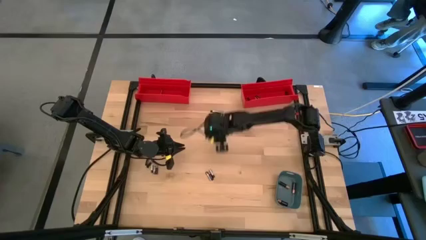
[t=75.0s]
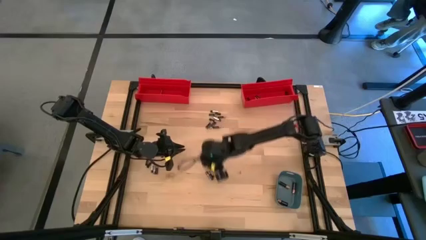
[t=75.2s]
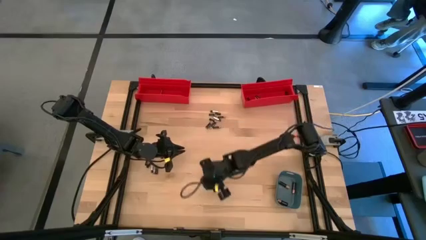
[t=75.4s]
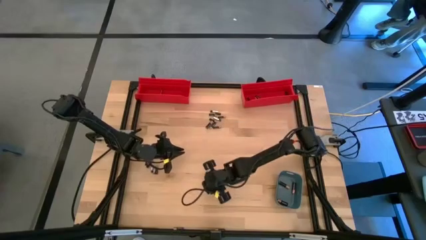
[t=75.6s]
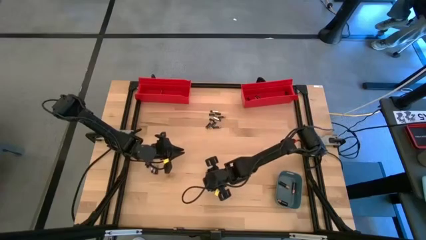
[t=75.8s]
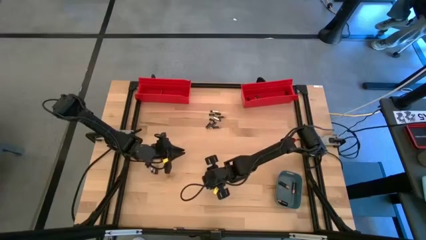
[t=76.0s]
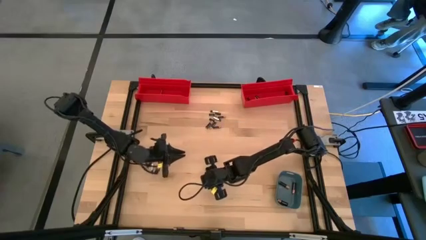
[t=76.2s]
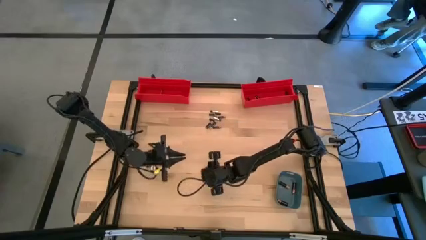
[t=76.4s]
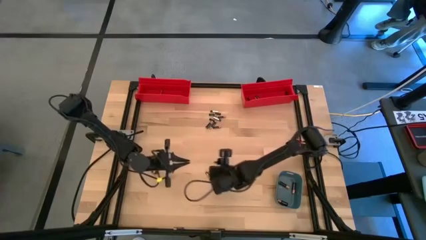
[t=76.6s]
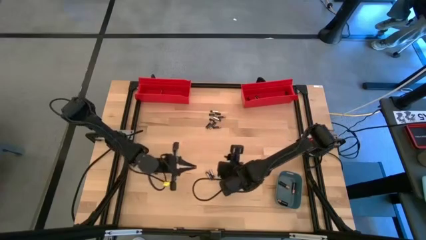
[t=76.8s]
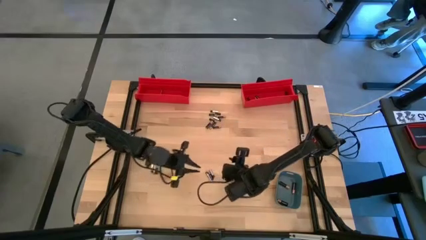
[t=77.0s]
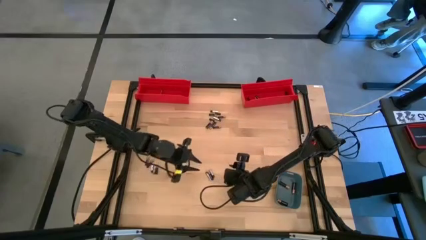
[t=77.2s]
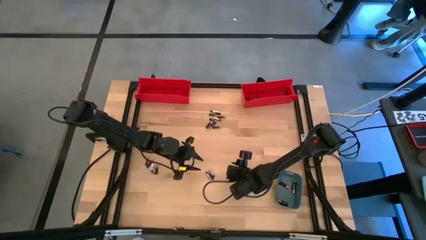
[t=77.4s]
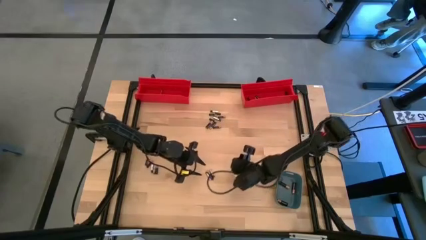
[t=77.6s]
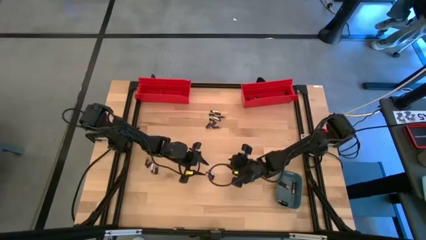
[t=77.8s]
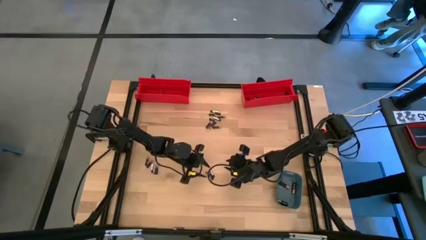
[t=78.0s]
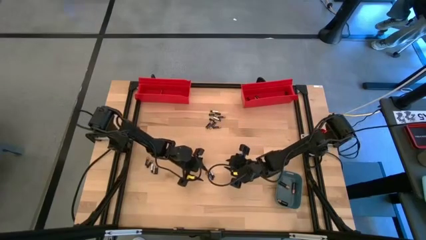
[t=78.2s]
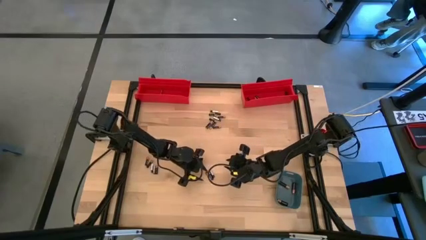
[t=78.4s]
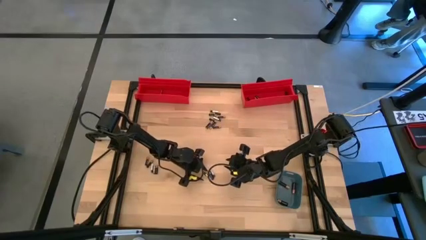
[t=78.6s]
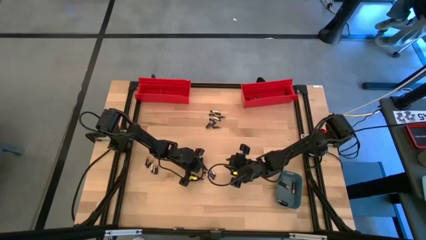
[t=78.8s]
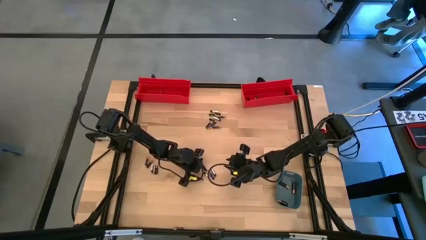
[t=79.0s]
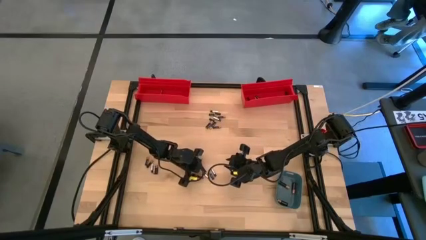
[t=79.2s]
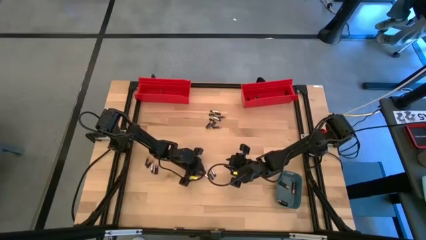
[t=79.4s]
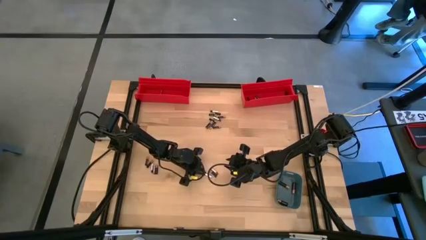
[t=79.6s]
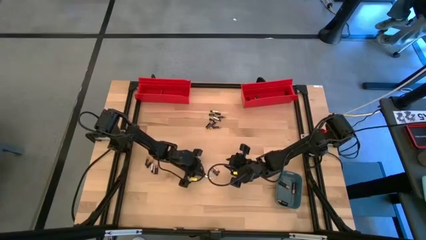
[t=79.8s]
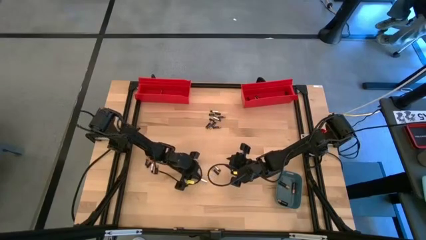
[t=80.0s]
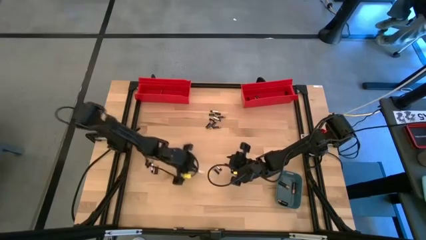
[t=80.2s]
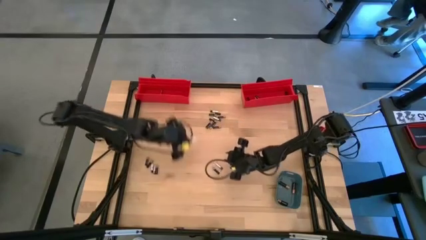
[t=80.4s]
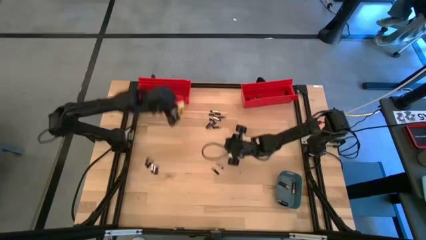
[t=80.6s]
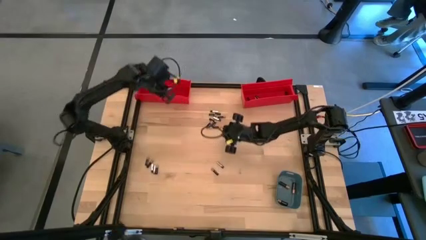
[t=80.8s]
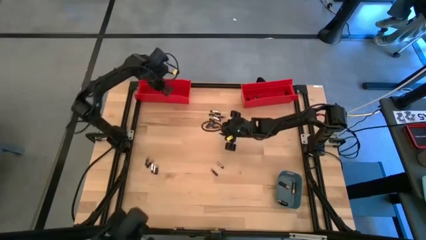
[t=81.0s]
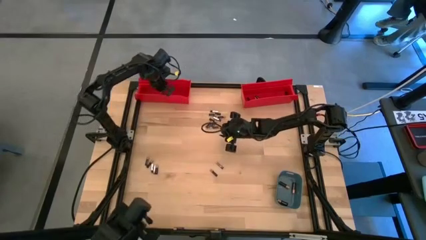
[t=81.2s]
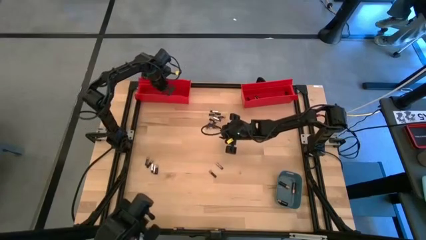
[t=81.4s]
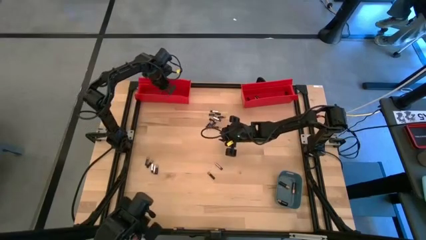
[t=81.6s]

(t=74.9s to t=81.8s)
Task: Sort batteries
Put the small silver battery into the left red bin

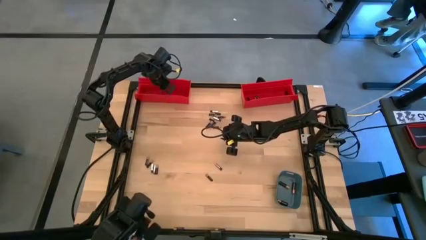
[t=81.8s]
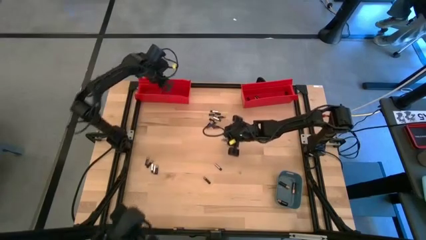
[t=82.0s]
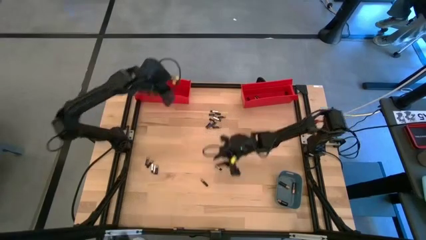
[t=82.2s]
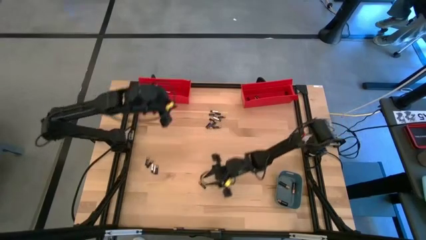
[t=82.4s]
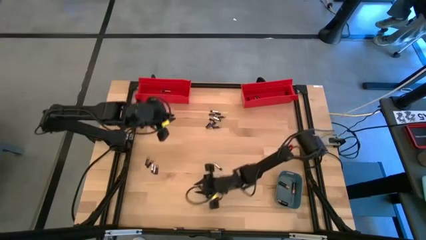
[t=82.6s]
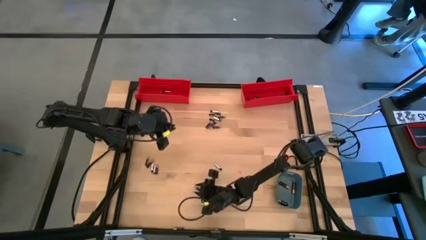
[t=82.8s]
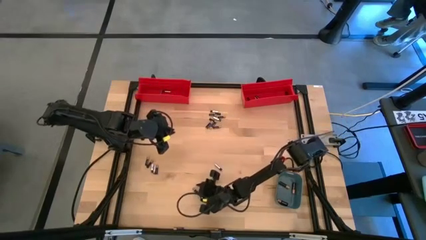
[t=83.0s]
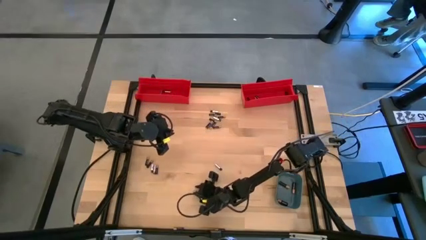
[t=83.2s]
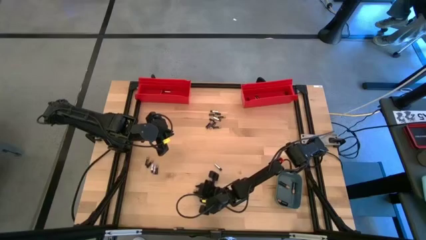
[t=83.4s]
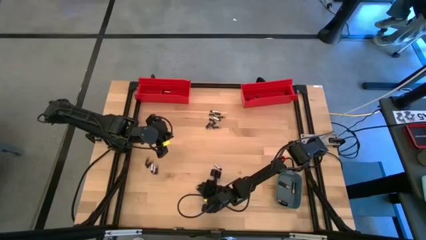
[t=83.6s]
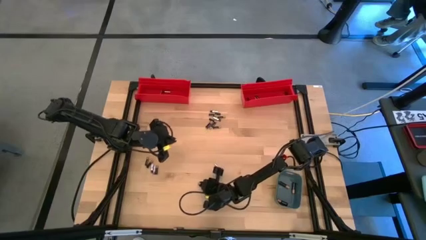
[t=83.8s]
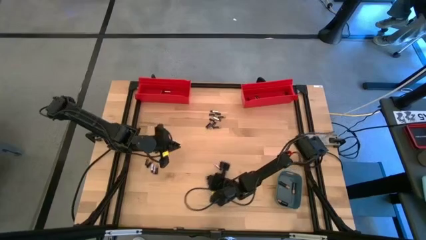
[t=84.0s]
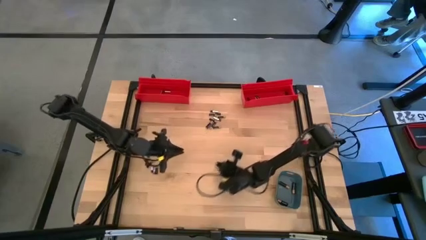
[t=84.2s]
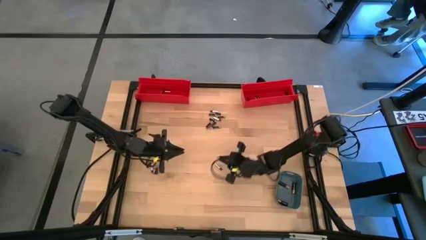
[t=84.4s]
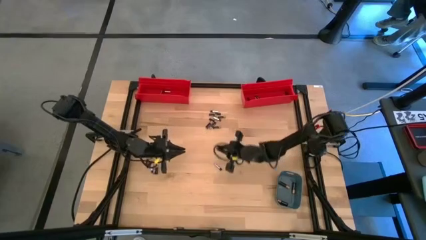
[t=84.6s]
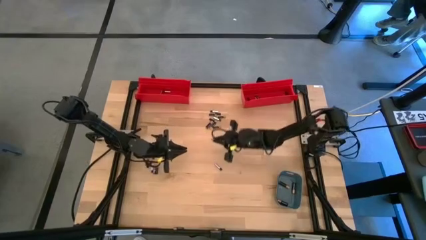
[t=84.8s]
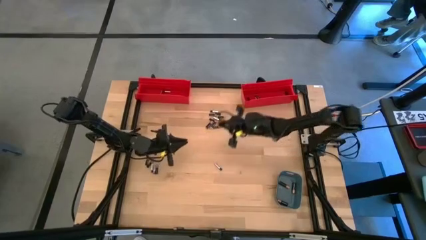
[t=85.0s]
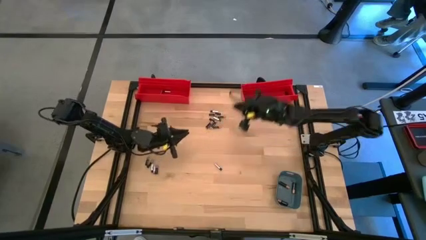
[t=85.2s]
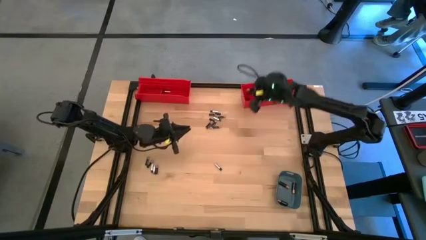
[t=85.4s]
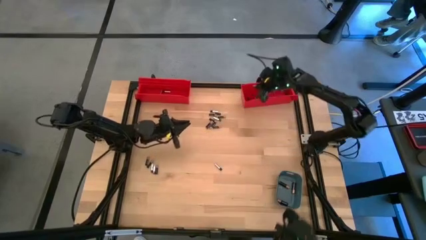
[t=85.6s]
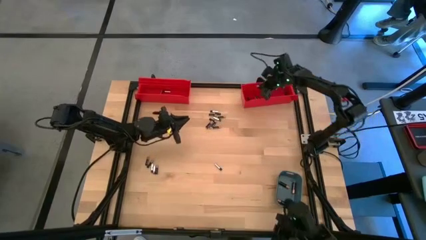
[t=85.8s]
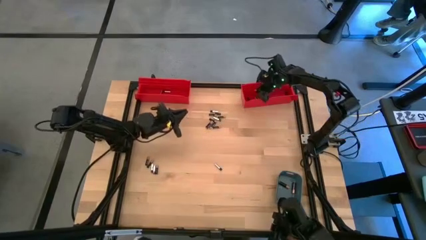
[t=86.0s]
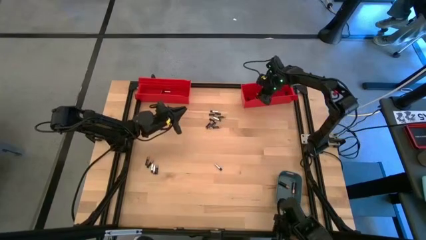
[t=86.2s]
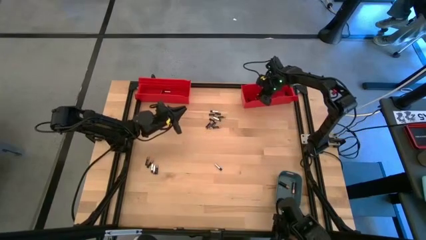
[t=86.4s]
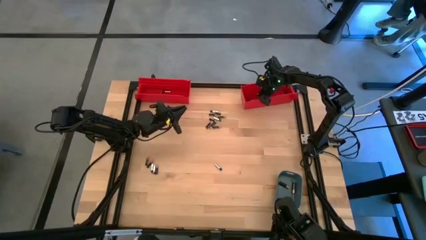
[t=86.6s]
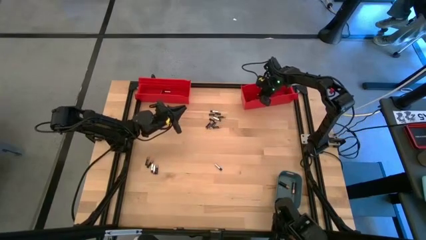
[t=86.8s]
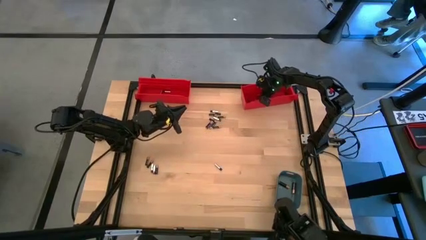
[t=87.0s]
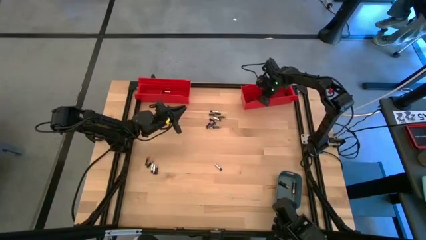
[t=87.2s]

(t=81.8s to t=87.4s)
Put the small black battery into the right red bin

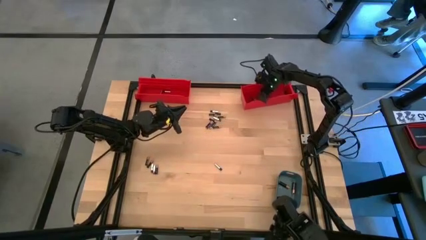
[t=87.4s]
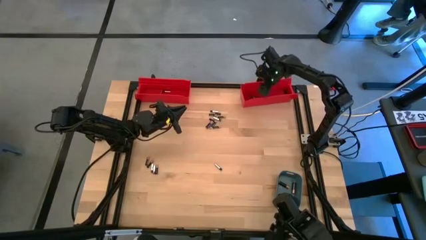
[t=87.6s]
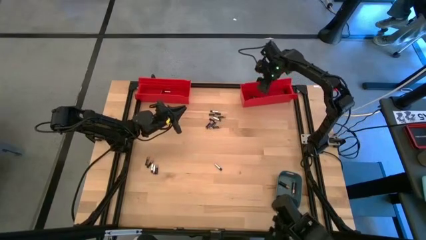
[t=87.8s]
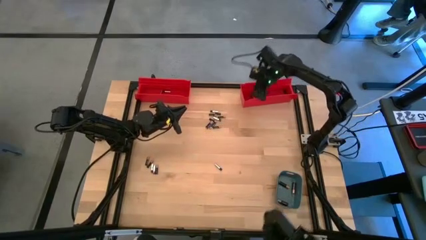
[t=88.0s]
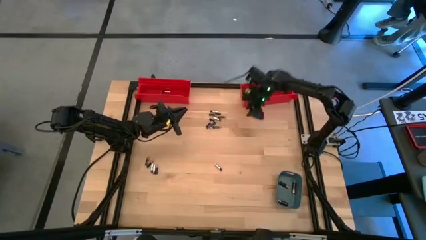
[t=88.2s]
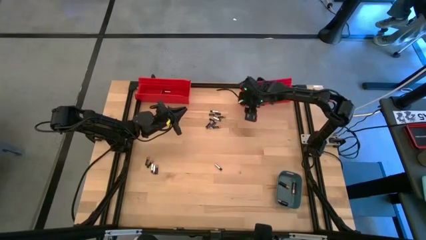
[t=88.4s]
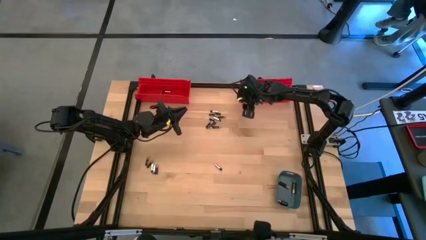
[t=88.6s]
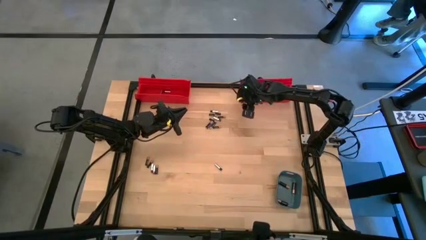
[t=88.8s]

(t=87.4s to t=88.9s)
Adjust the right red bin

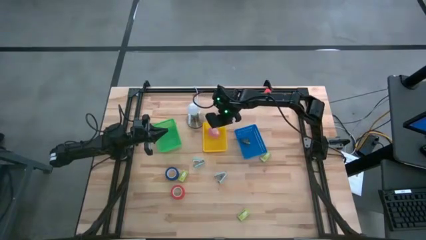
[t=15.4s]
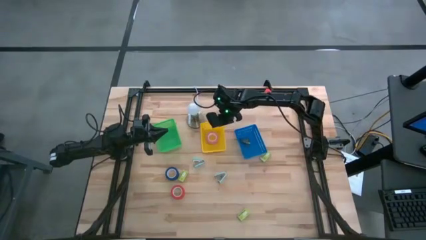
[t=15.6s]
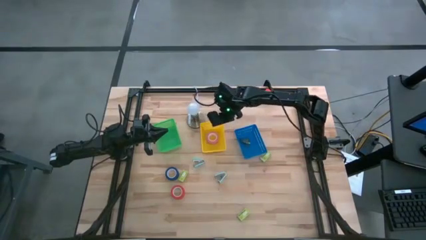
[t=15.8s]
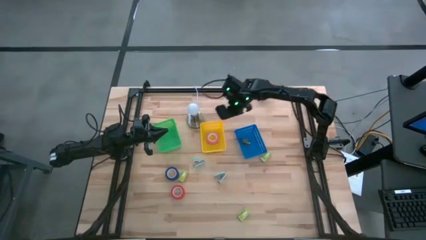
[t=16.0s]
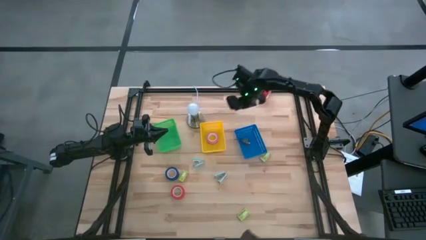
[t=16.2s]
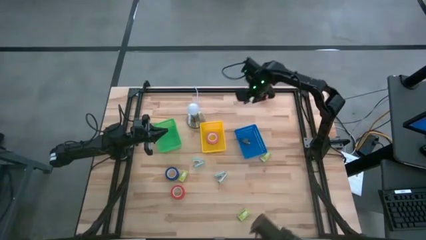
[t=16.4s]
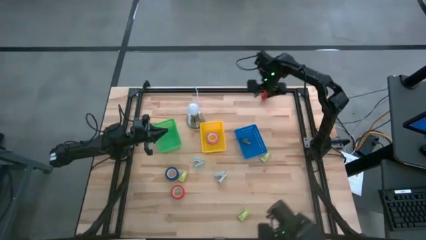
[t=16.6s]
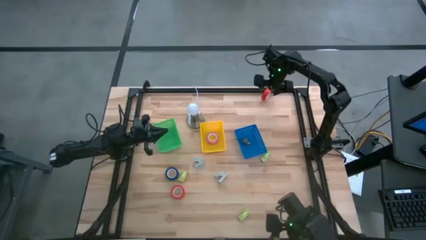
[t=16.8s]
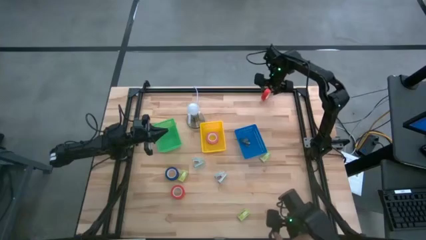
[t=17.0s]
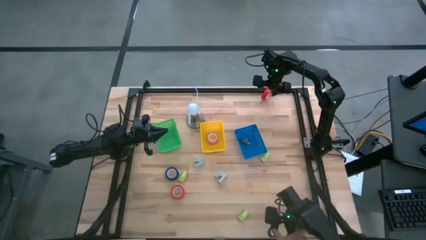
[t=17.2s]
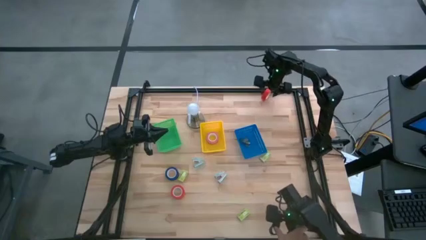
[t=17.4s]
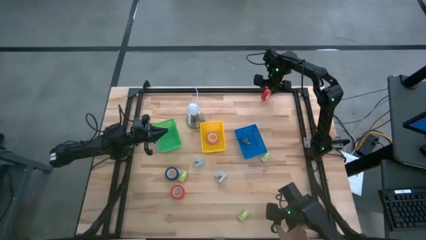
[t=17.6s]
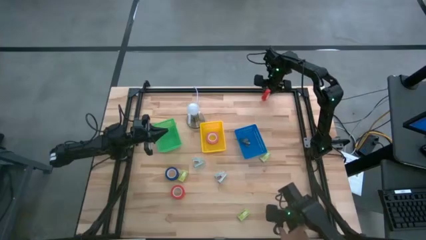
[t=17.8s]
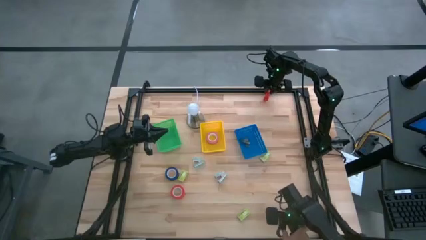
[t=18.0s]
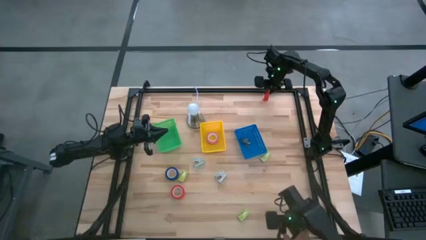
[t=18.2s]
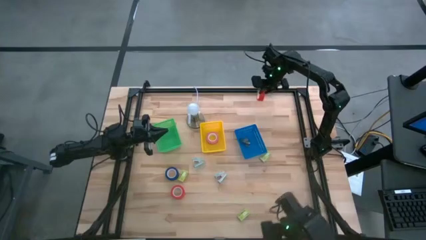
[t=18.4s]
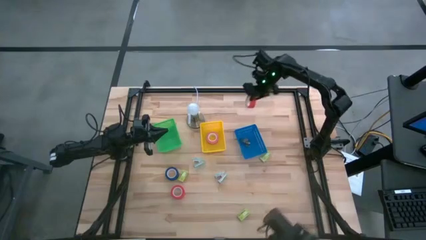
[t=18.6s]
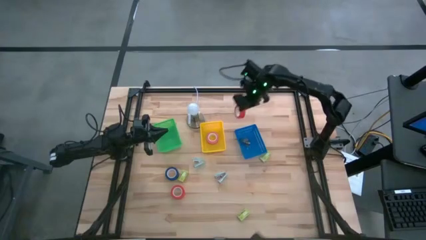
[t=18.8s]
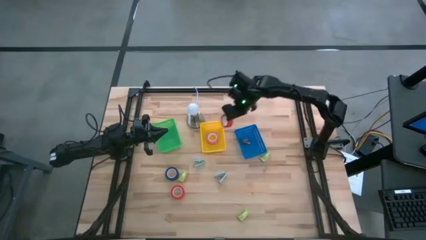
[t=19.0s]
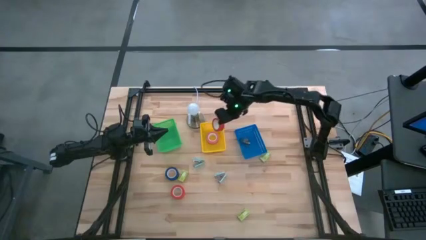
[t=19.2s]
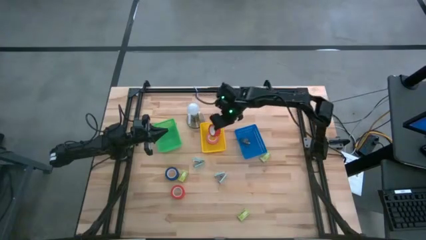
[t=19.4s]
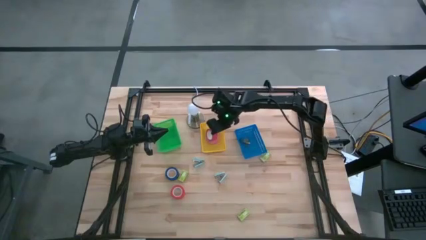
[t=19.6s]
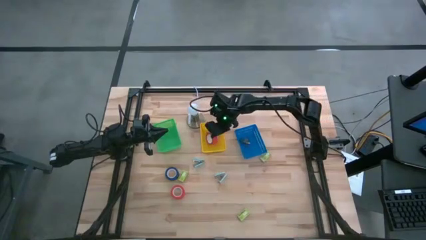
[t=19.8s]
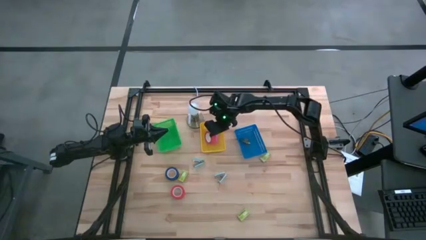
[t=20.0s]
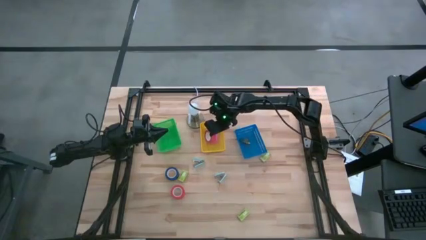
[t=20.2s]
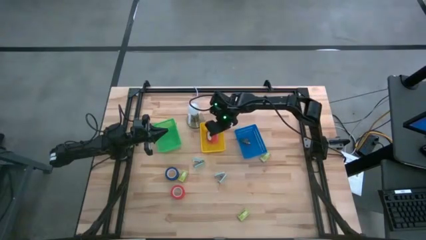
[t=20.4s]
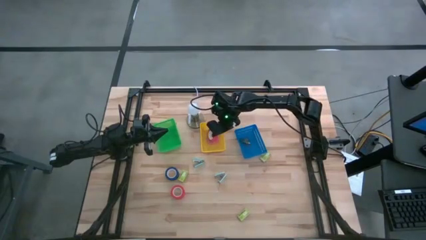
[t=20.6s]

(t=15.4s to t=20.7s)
Task: Pick and place Stapler, Stapler remover, tape
Put the top red tape into the yellow basket
